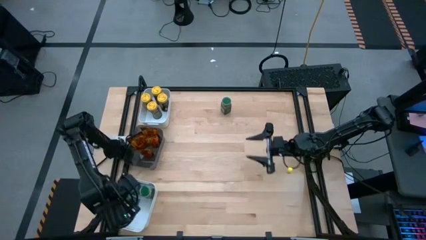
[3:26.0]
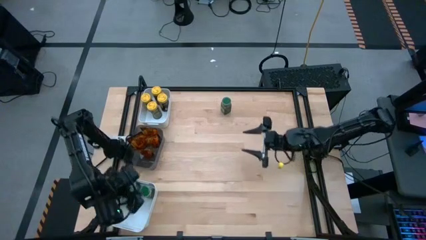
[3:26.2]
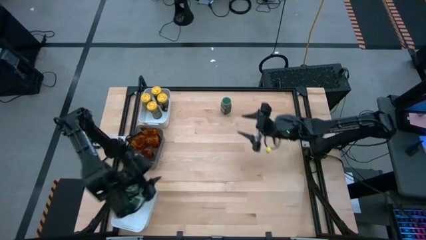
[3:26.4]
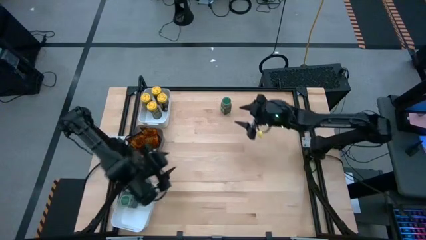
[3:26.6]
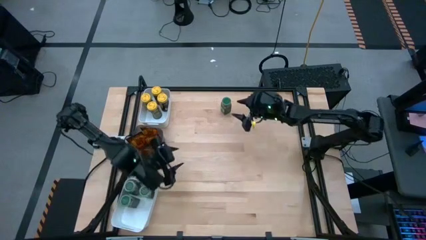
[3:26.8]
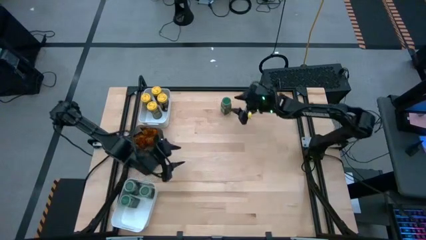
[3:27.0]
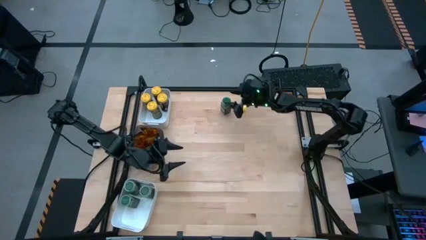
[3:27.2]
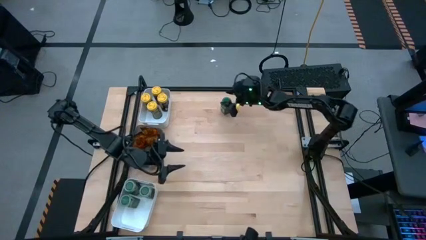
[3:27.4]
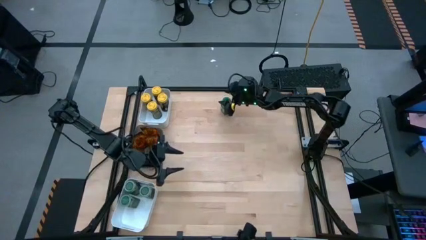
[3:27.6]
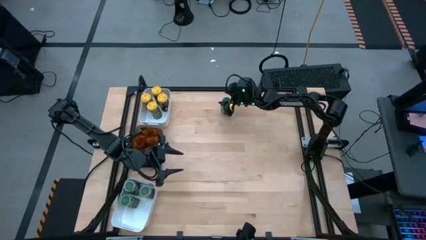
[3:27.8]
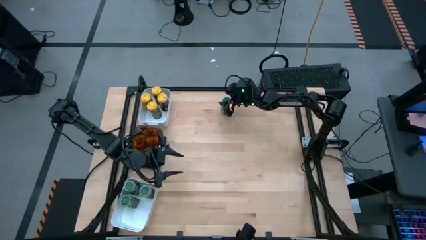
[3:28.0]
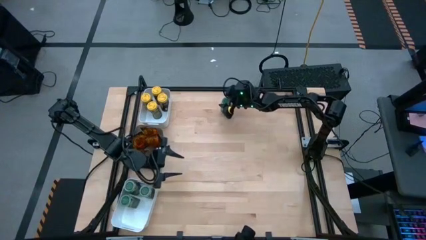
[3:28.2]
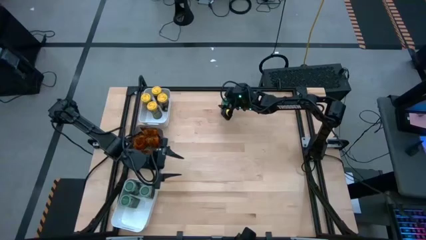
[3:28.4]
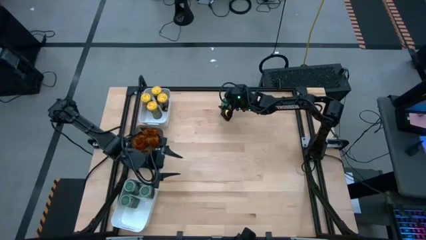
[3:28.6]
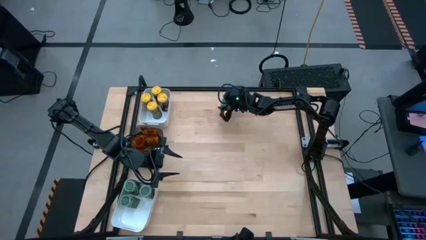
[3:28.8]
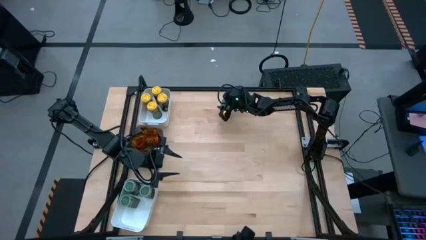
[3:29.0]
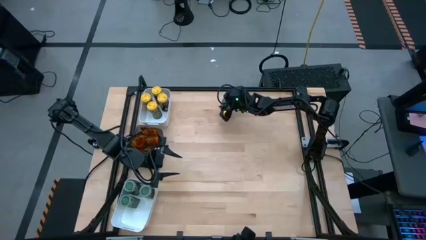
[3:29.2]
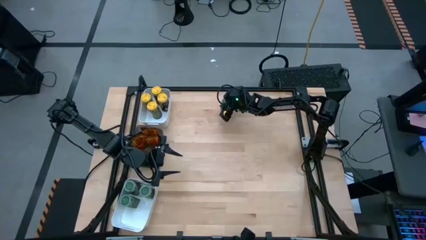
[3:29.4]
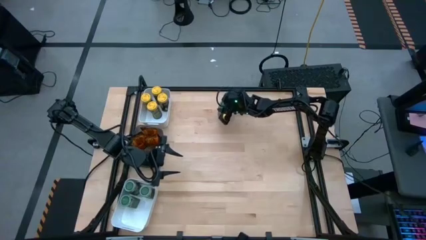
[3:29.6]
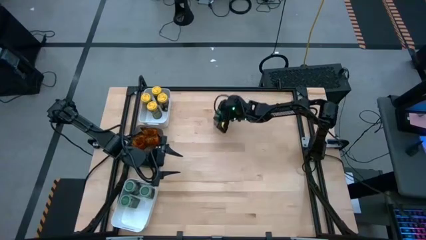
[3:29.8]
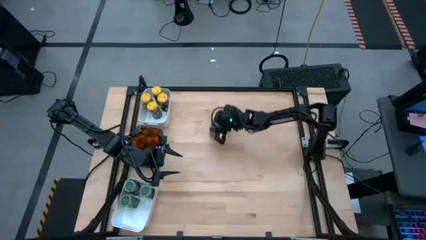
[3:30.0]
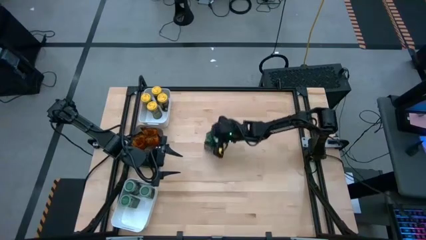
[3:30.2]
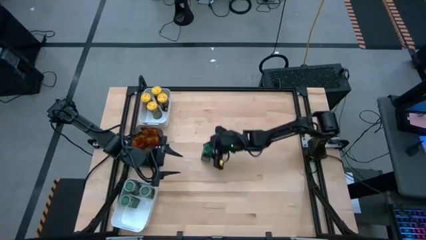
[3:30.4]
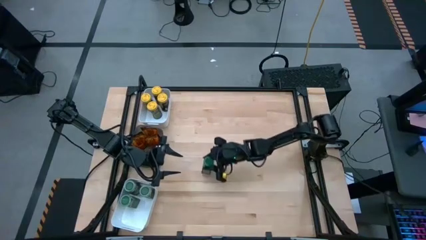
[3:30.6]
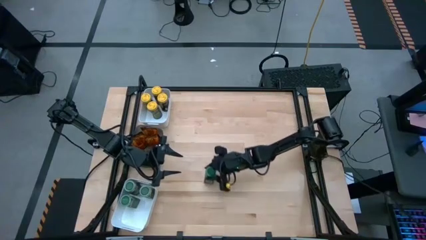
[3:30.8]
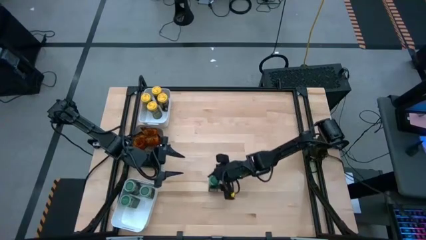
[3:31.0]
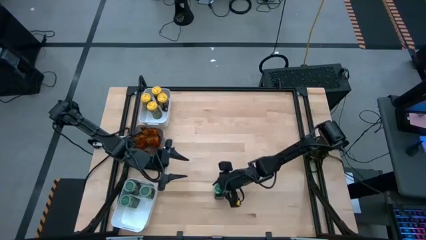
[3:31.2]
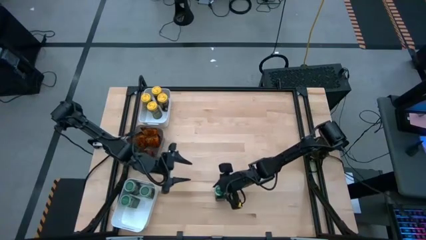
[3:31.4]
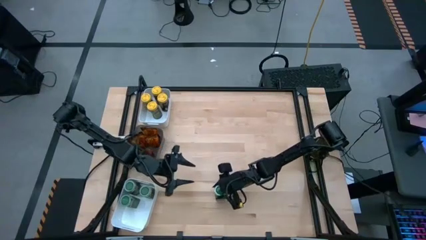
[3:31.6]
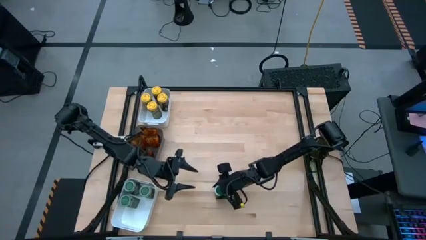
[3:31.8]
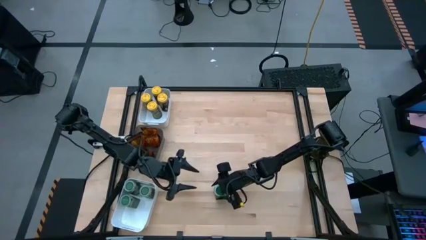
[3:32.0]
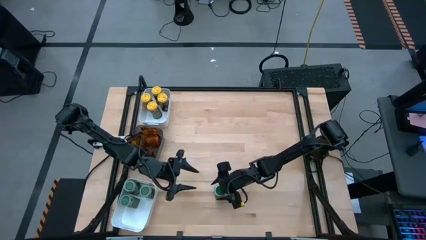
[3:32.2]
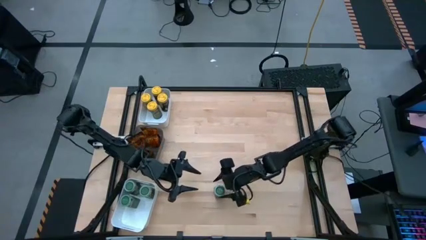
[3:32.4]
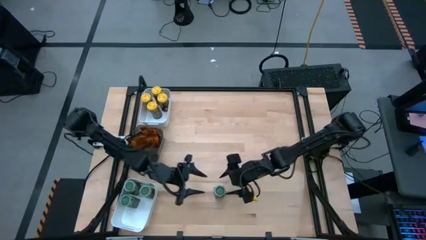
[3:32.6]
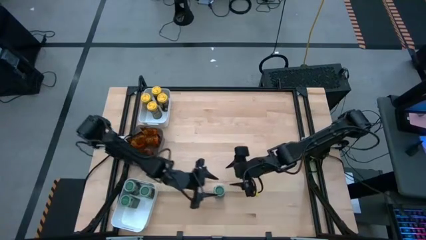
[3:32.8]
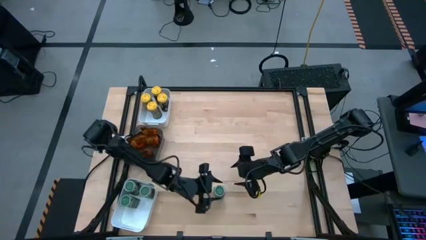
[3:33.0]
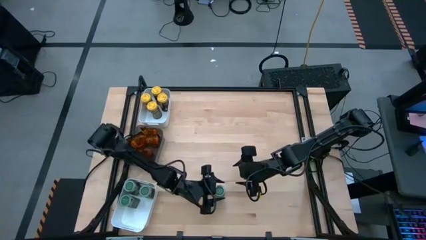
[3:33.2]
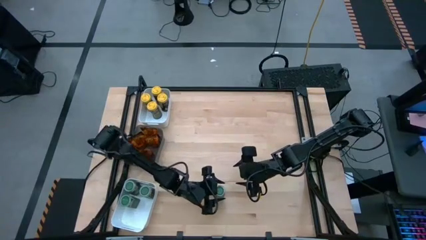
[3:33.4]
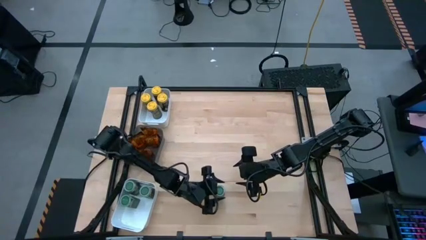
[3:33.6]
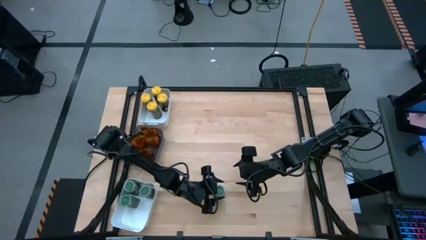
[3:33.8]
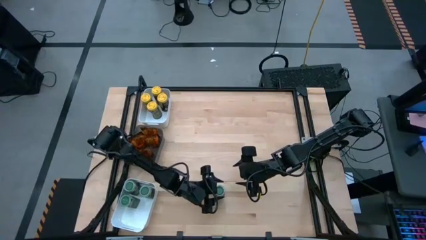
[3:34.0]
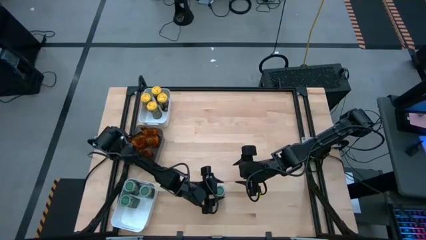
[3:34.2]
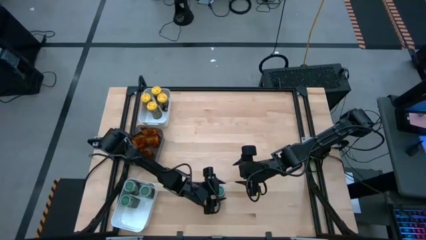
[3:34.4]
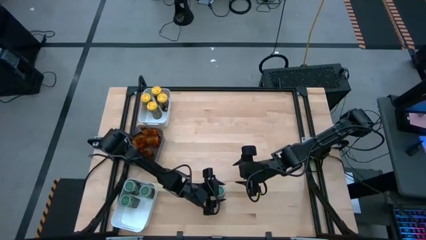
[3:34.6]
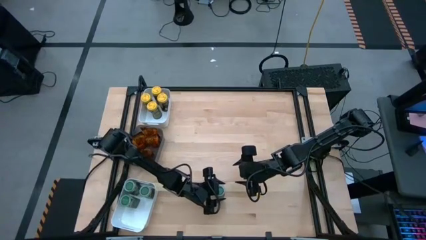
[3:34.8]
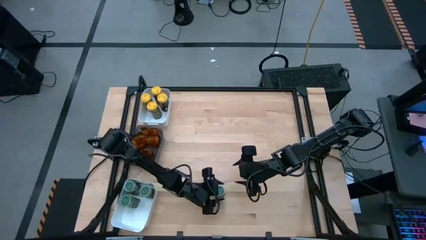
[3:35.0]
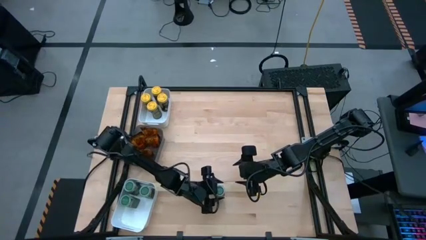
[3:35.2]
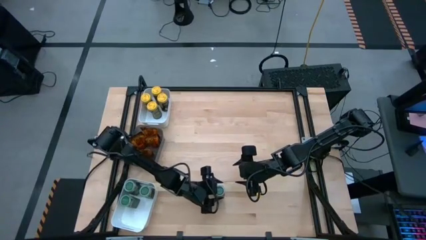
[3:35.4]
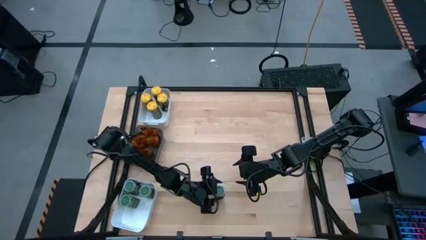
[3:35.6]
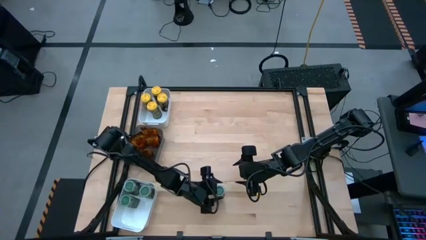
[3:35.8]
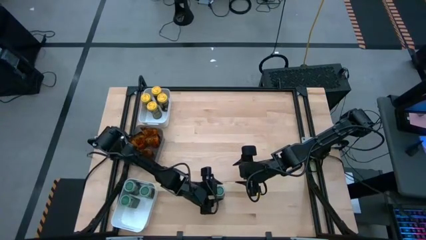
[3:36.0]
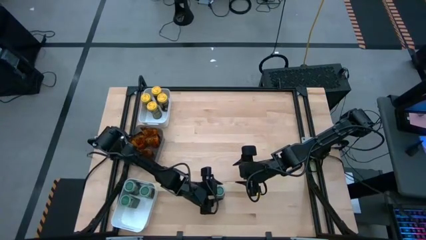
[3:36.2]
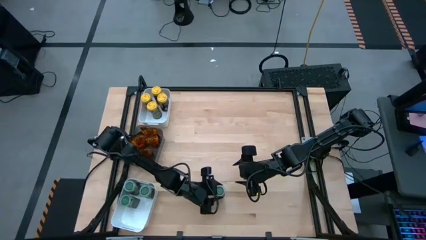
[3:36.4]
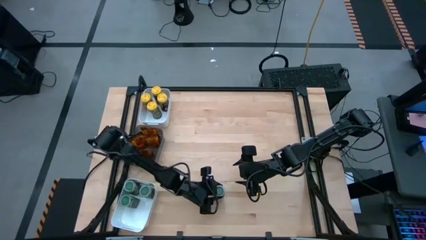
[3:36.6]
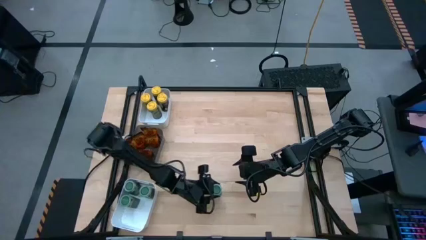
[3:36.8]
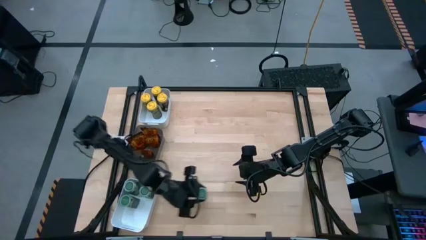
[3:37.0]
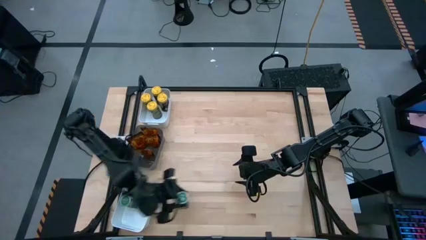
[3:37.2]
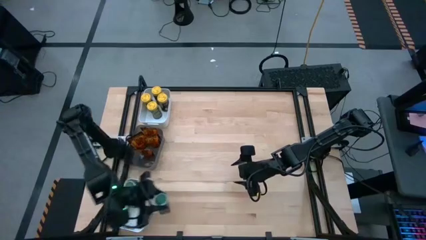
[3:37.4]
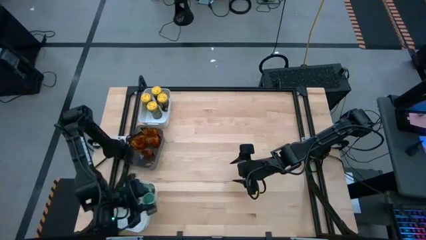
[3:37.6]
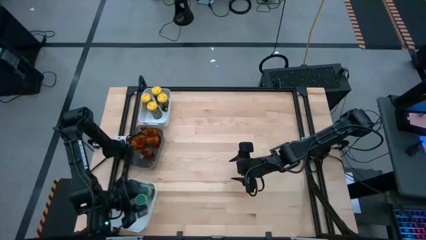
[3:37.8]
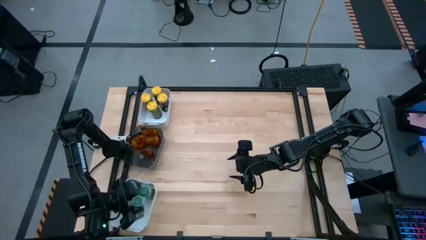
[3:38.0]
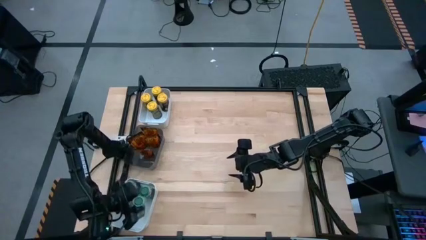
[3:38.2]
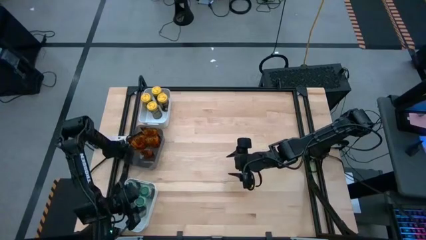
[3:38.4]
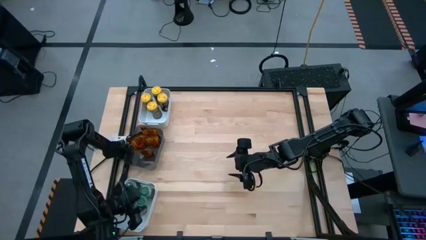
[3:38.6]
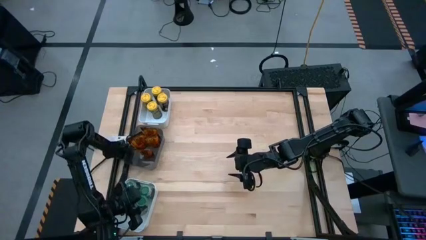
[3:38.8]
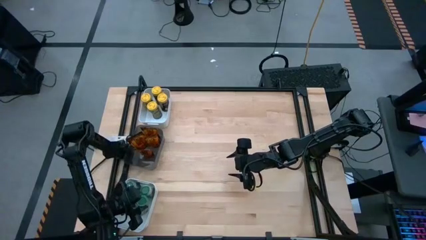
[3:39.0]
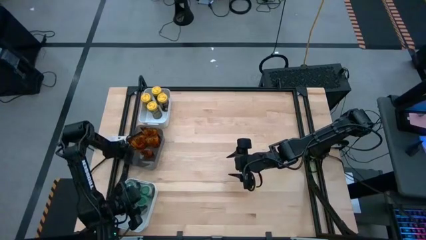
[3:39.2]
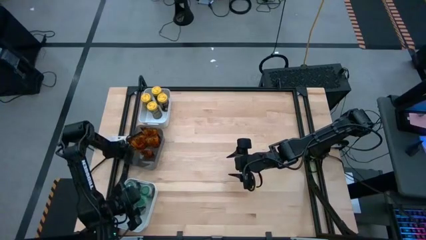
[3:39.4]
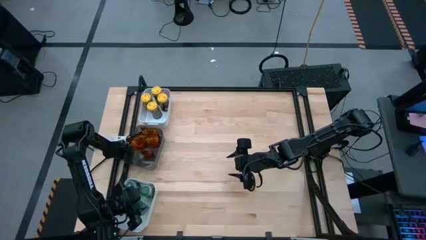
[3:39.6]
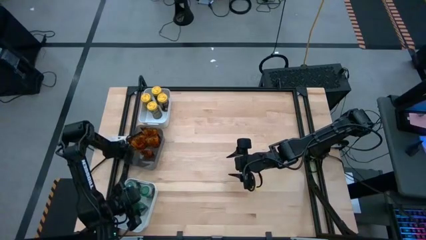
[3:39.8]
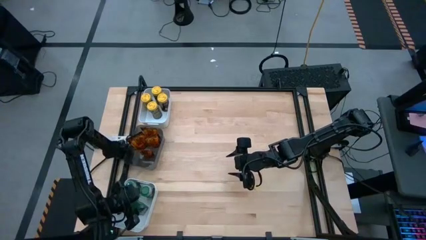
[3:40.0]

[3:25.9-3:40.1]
Task: Sort spices by type
Put the green seasoning bottle into the bottom white bin

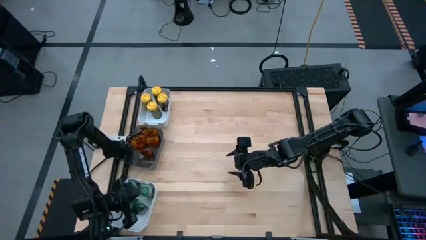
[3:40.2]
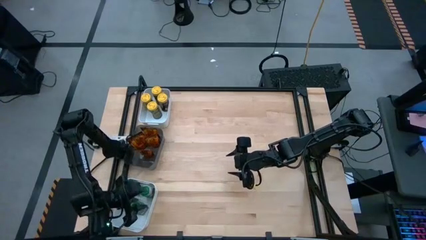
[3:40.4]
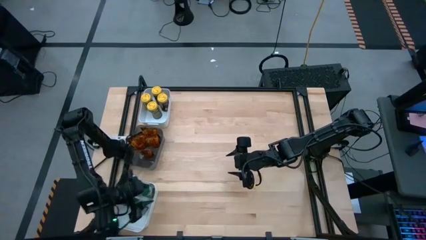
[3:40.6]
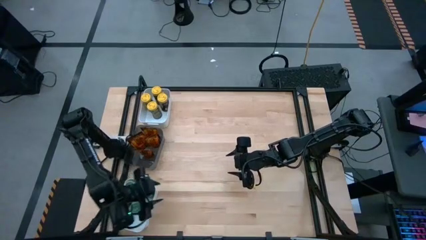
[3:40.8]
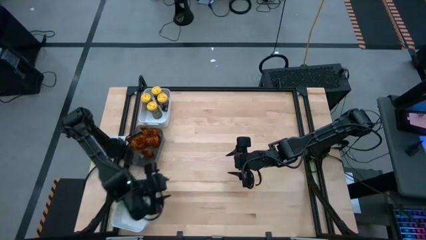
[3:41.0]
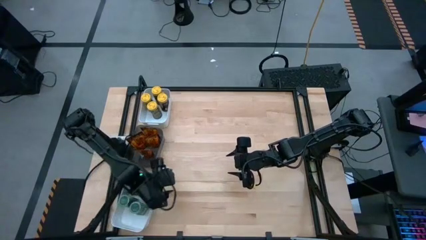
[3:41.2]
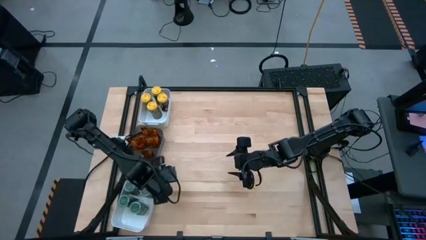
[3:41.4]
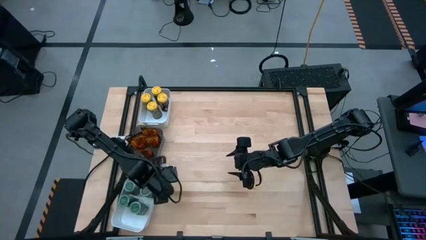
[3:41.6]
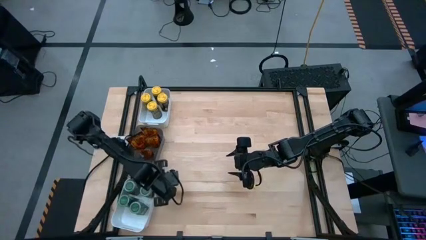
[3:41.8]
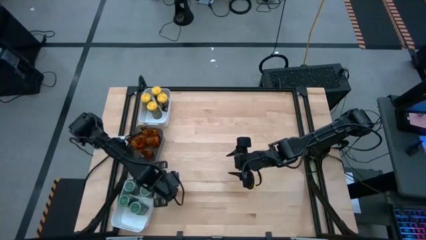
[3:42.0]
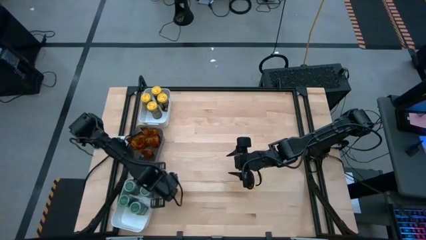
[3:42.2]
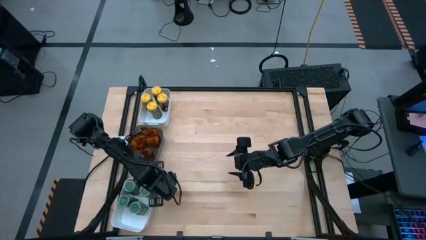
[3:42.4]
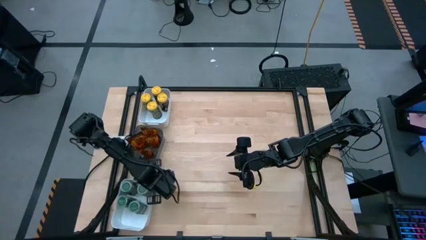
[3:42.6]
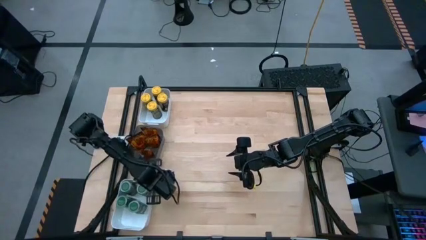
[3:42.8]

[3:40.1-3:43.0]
Adjust the bottom white bin
